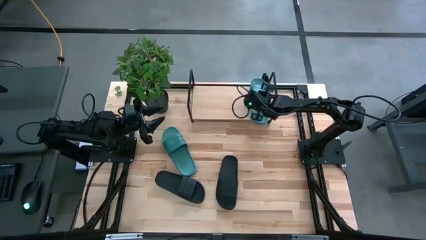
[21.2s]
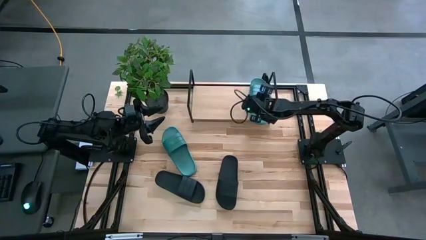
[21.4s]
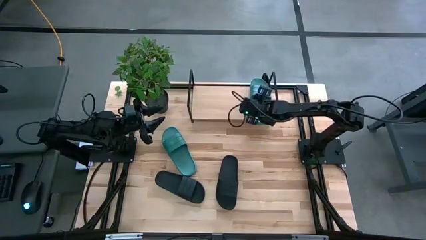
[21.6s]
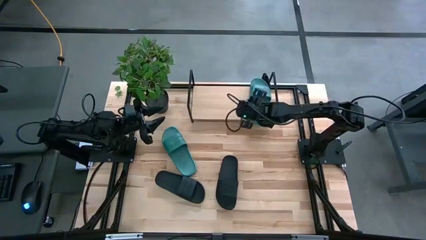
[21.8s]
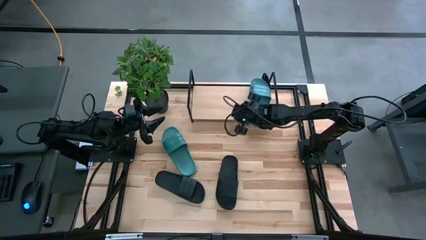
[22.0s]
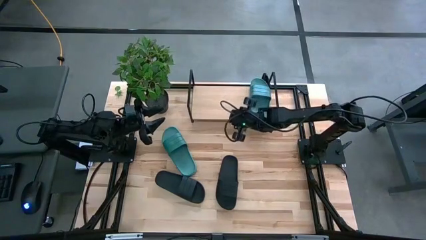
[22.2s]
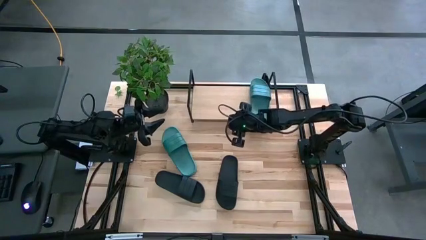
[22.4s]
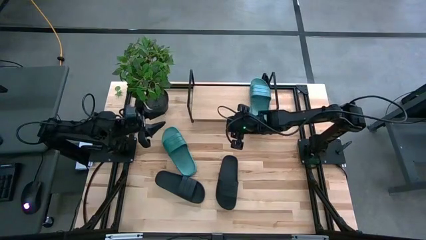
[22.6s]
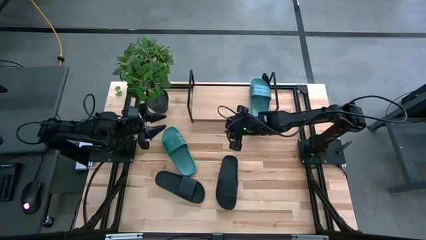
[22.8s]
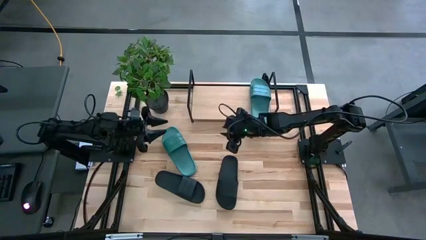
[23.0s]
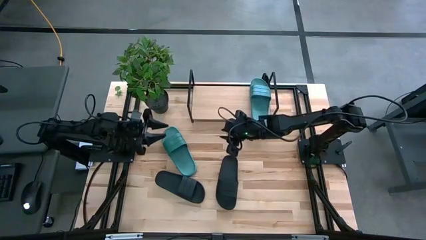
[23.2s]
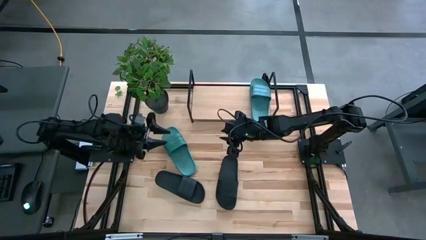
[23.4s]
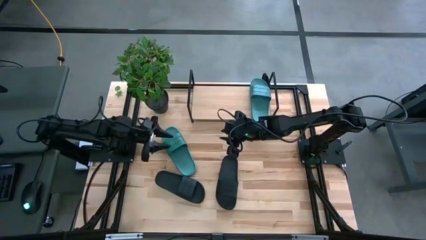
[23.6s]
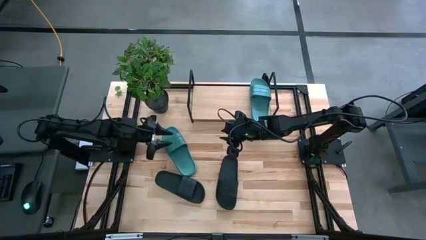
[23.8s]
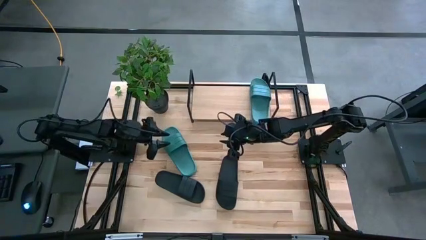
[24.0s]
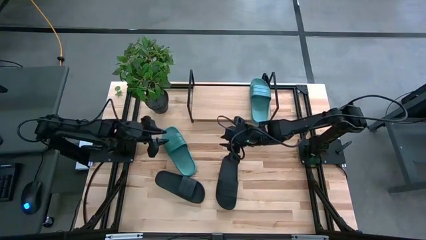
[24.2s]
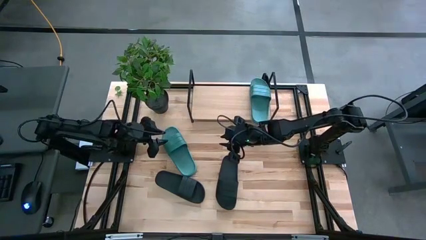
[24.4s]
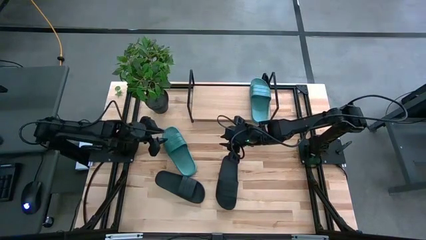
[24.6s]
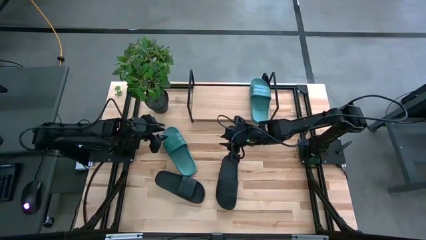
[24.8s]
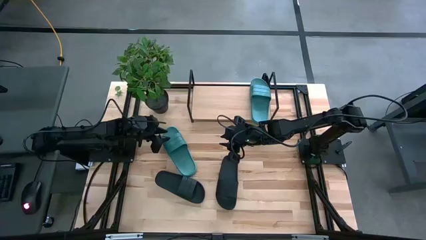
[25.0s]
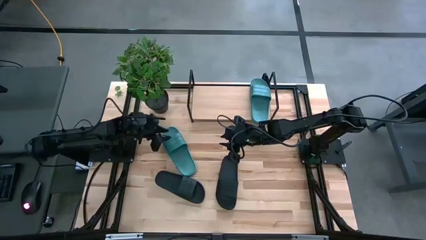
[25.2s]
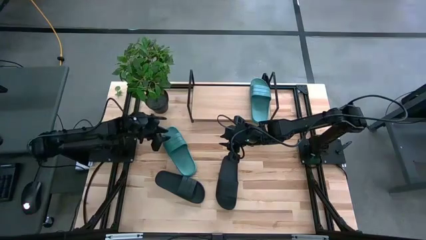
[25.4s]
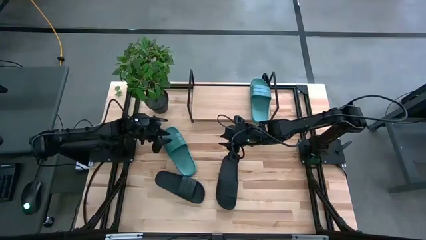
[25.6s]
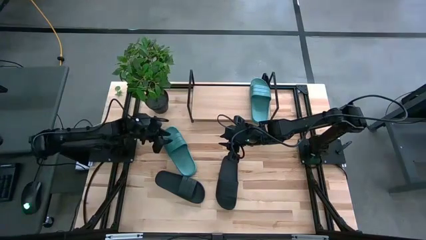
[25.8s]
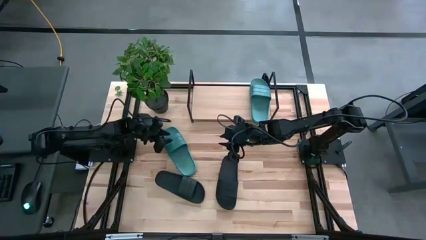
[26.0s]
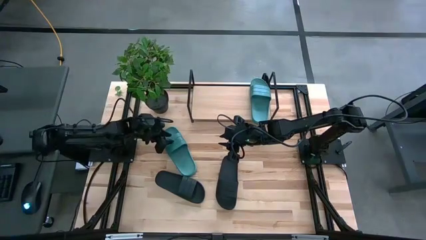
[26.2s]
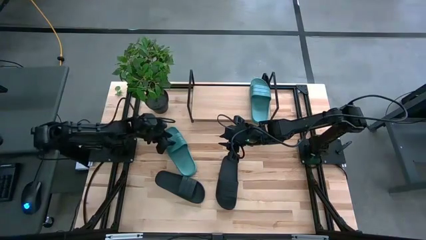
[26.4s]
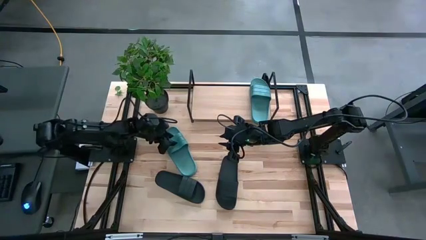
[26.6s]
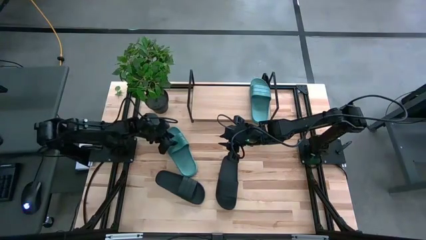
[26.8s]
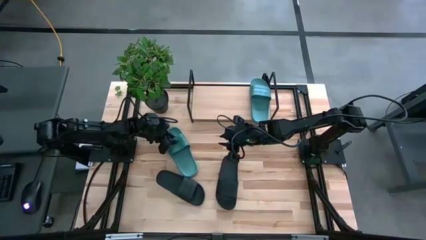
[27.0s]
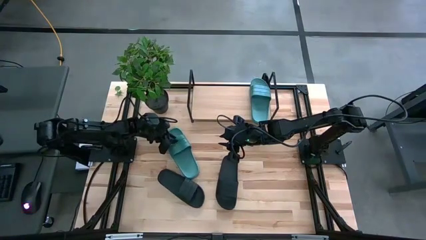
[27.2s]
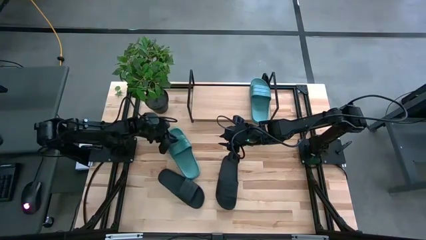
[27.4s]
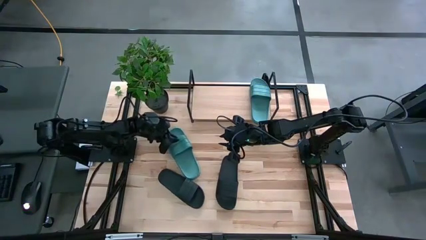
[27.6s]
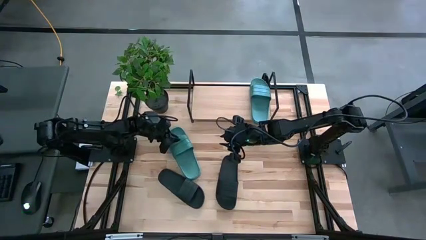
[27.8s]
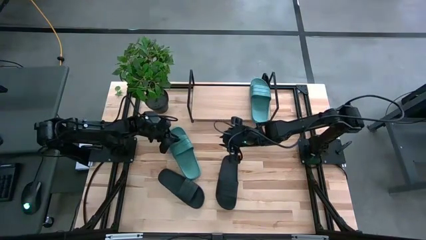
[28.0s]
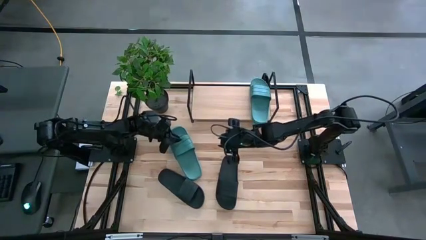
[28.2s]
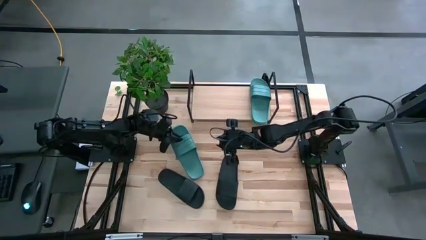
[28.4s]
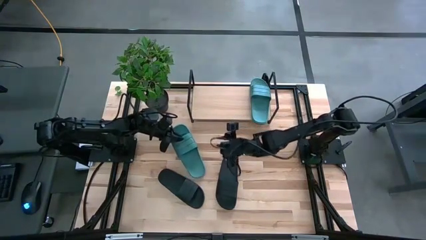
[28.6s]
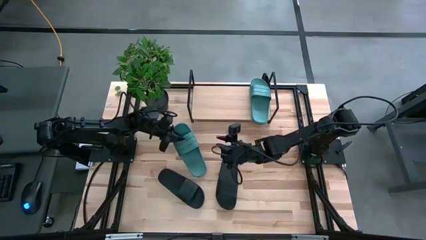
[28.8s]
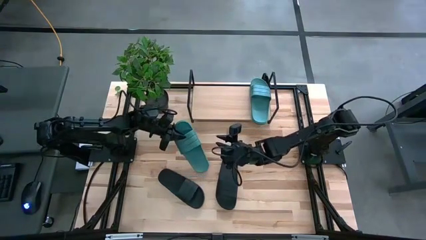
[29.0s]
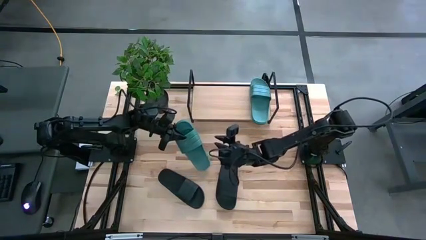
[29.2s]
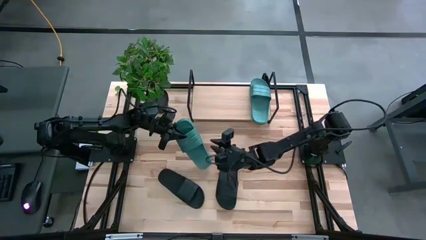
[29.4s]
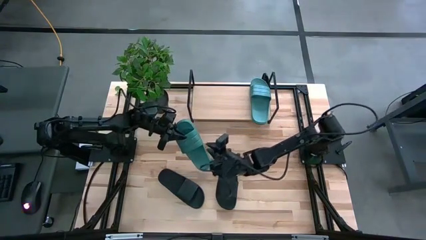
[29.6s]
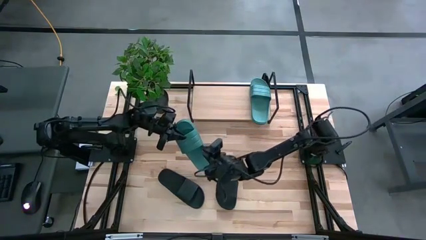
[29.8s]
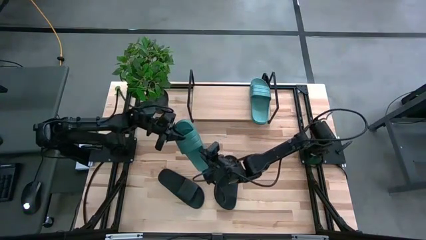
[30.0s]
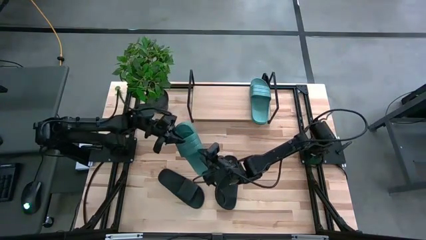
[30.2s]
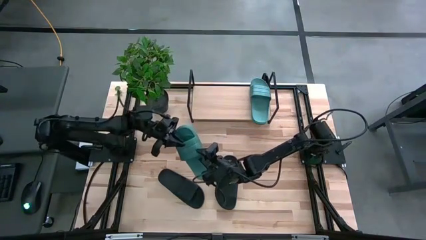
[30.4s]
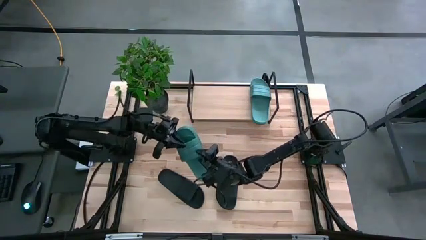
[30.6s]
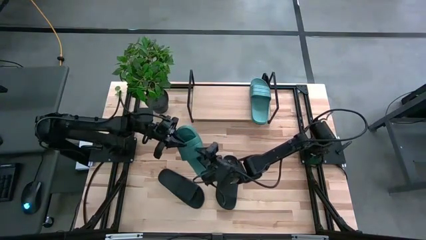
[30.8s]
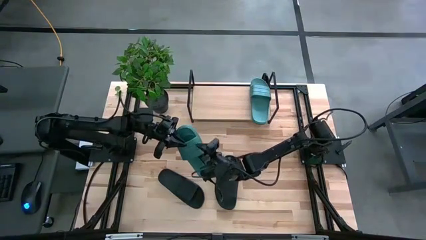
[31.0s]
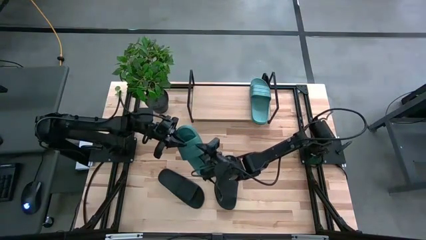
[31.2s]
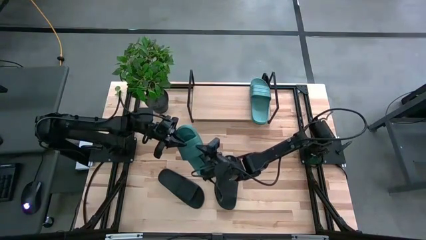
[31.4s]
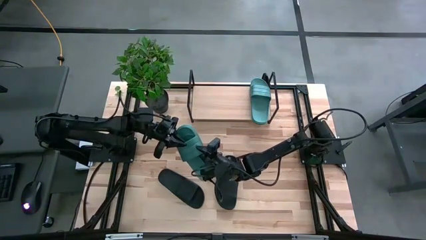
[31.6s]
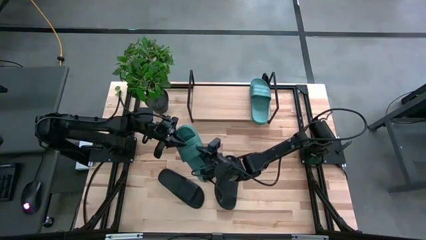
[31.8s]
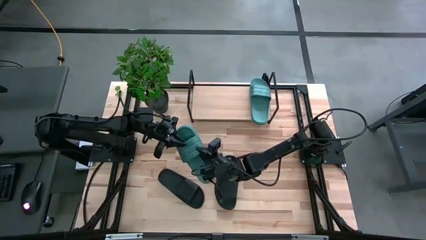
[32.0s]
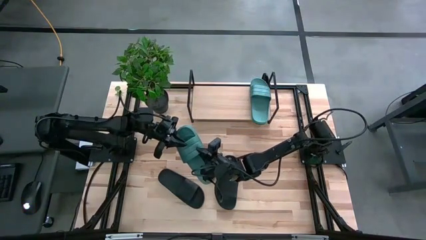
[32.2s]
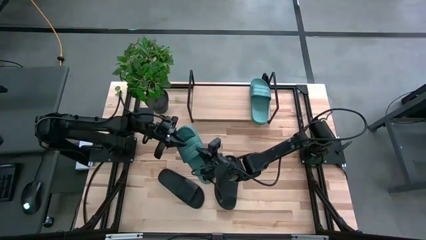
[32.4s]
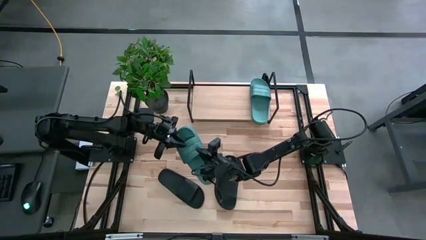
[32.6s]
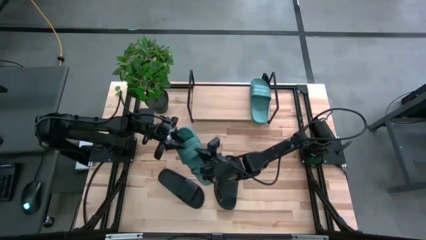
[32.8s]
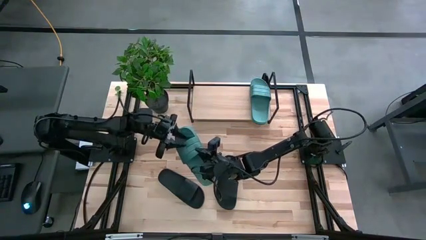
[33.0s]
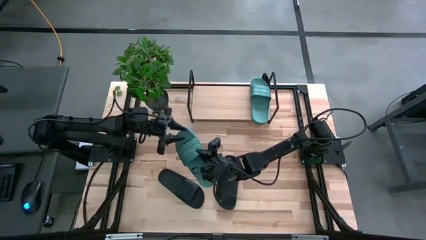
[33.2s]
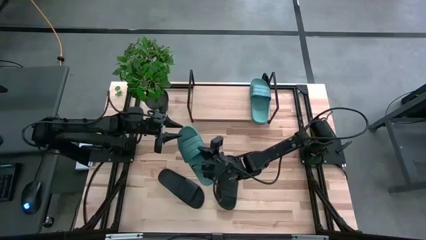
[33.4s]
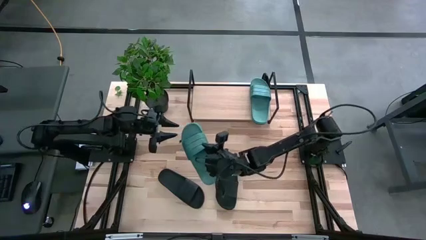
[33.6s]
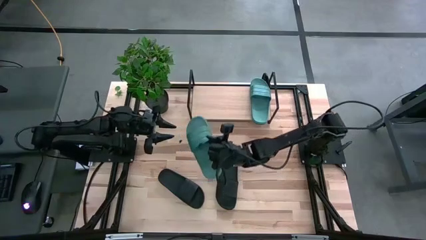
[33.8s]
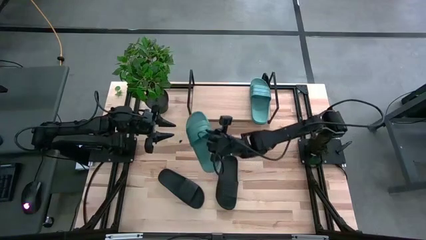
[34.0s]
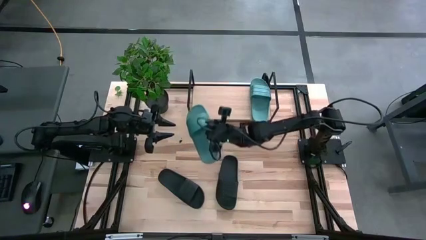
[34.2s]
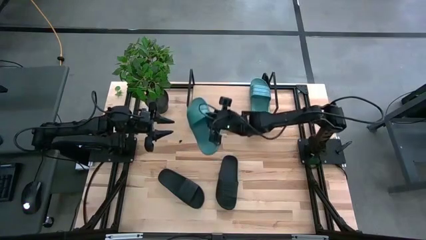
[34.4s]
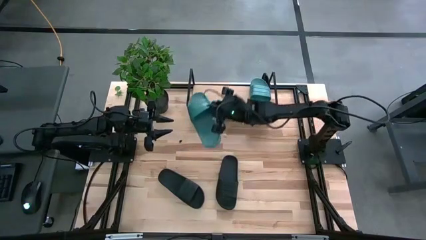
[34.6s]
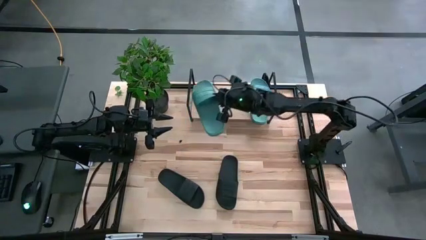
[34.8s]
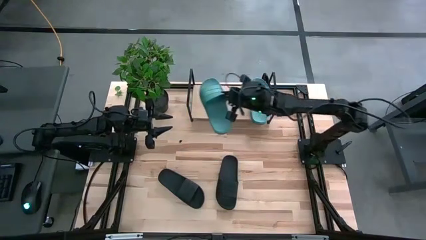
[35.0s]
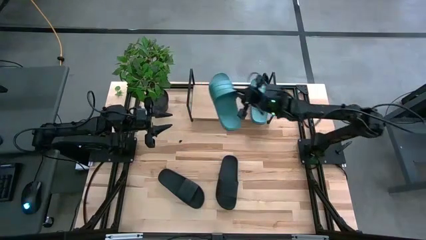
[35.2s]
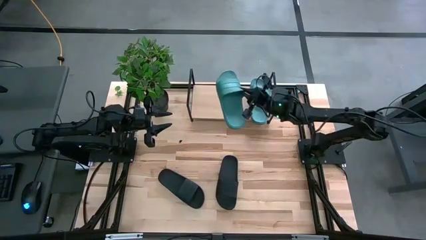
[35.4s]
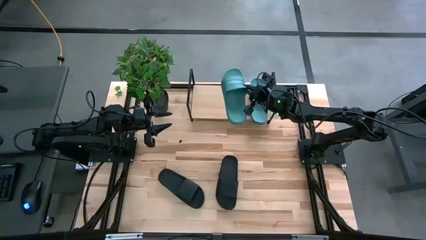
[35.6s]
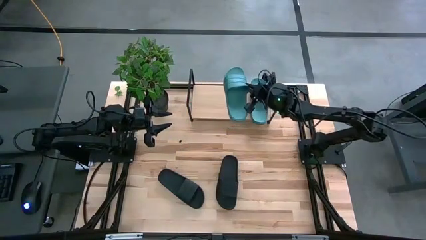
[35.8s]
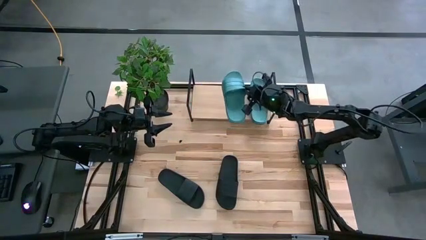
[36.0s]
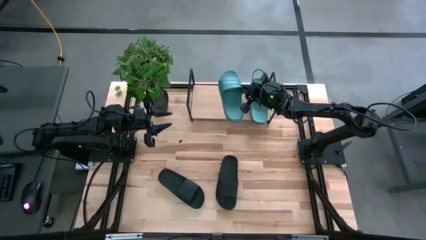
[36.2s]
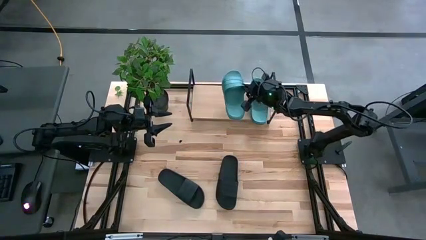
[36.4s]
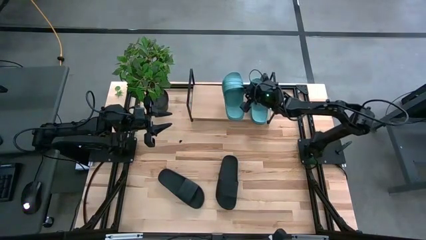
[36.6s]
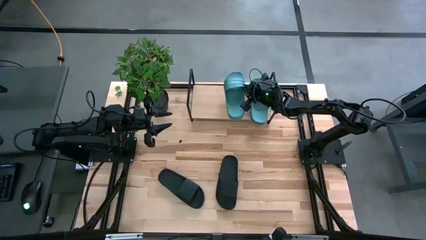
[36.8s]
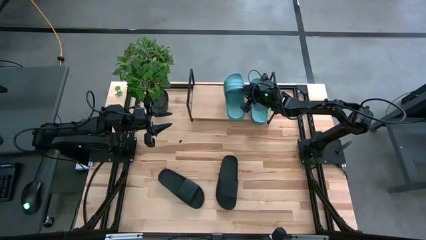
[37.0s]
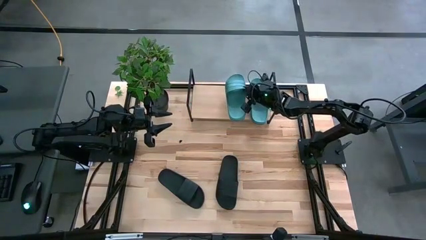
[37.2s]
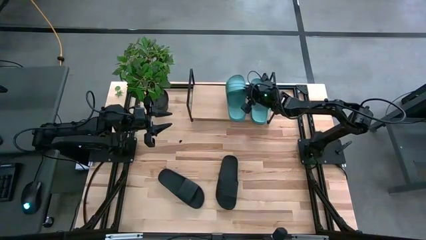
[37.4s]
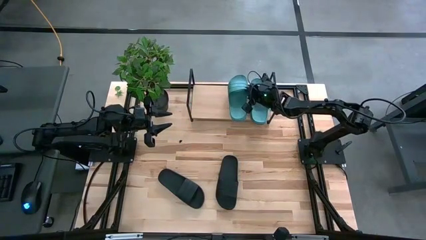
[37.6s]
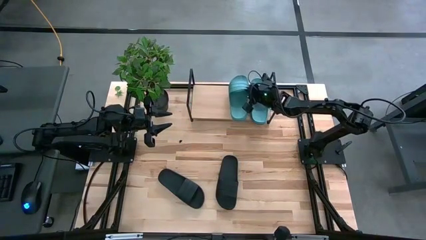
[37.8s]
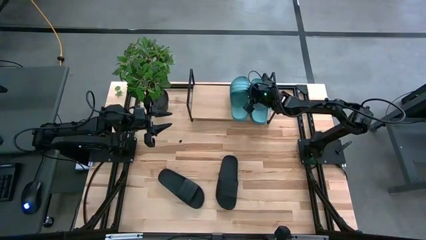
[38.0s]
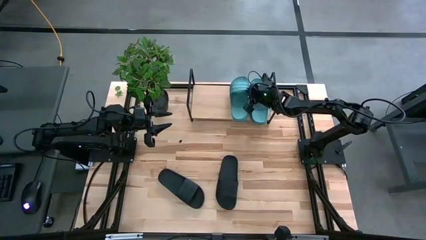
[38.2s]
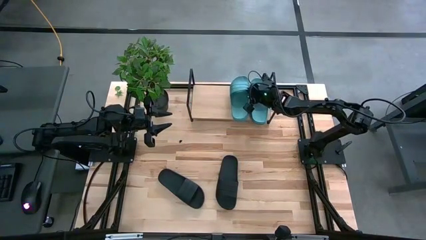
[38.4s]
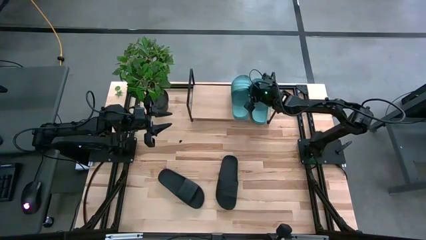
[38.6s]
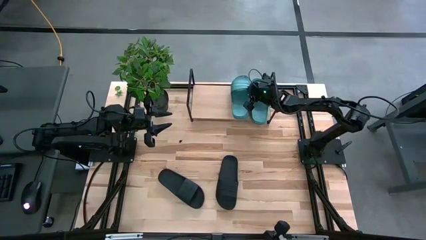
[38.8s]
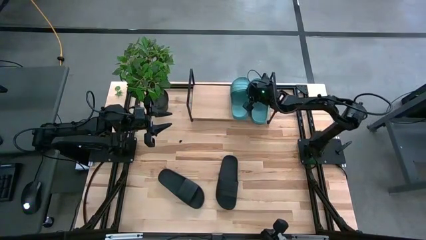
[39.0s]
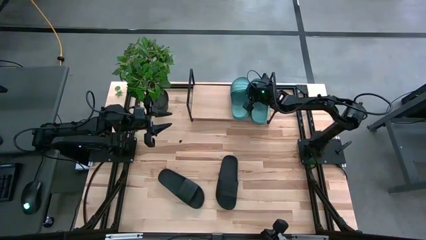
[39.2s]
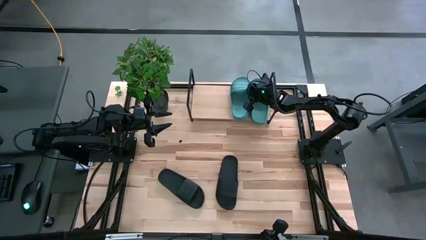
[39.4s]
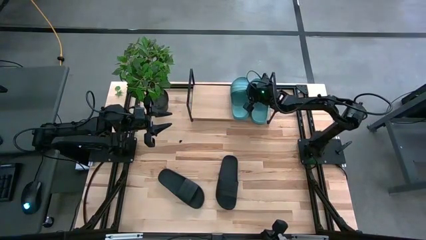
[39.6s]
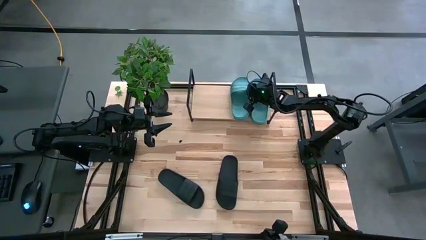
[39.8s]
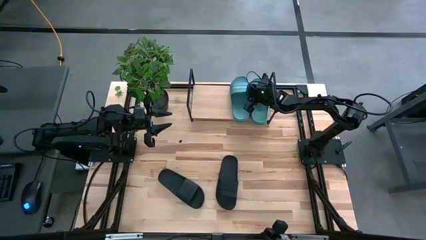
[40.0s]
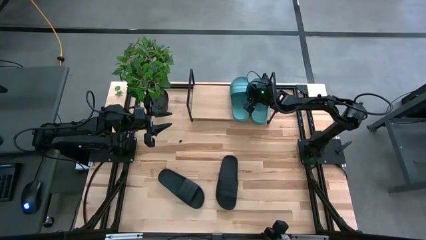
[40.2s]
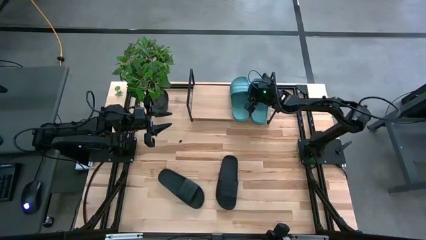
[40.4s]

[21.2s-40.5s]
Task: Pick and place slides into the shelf
Put the green slipper on the shelf
